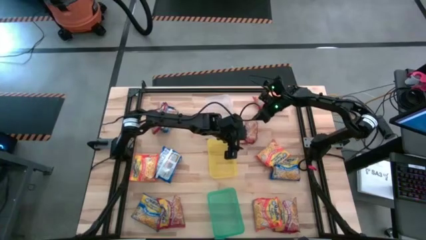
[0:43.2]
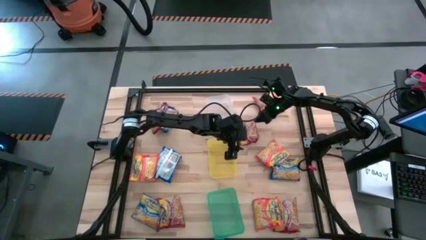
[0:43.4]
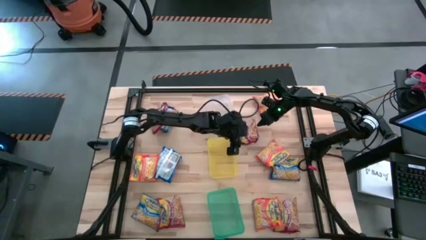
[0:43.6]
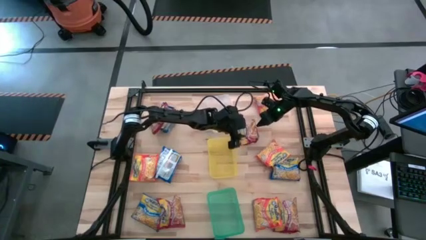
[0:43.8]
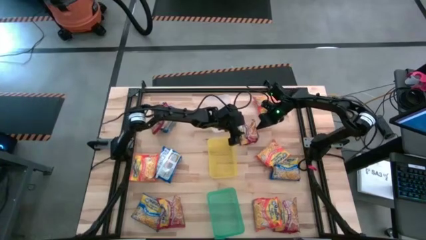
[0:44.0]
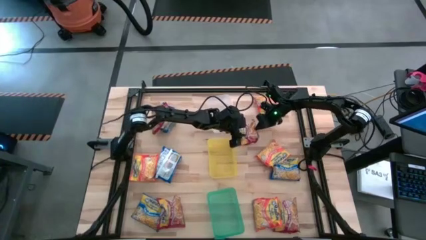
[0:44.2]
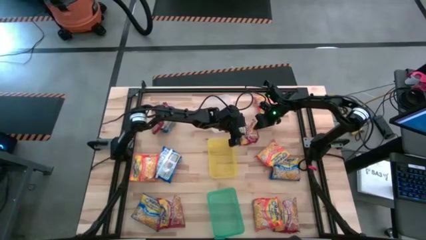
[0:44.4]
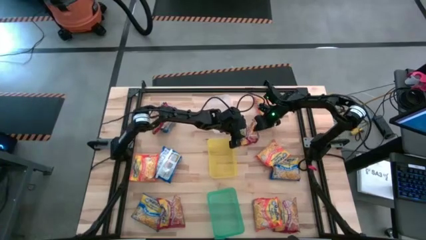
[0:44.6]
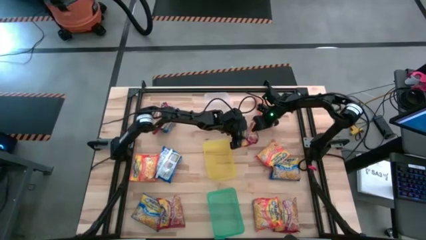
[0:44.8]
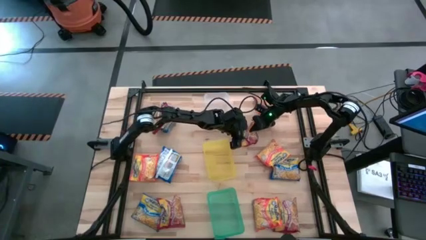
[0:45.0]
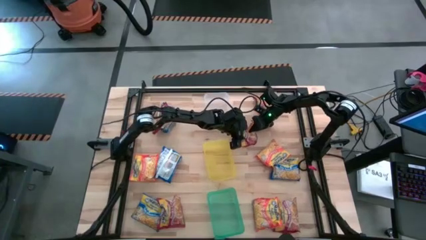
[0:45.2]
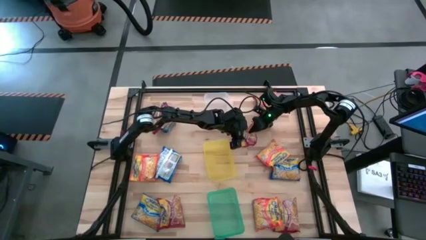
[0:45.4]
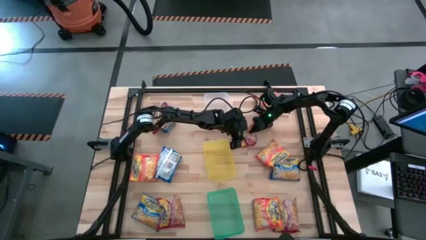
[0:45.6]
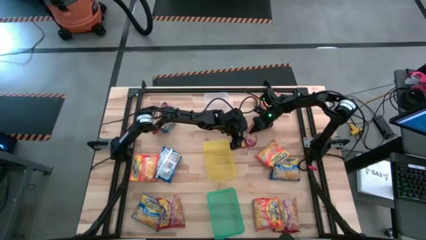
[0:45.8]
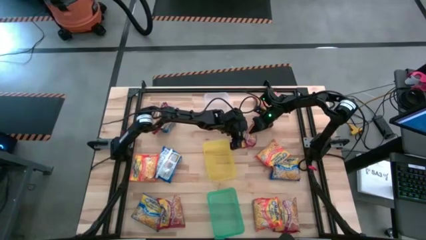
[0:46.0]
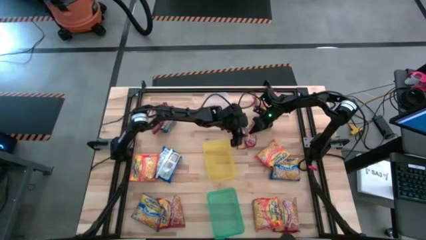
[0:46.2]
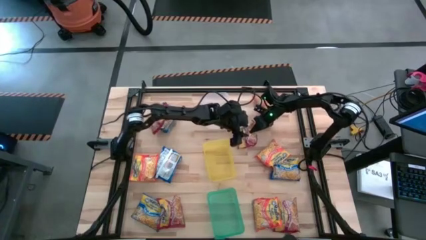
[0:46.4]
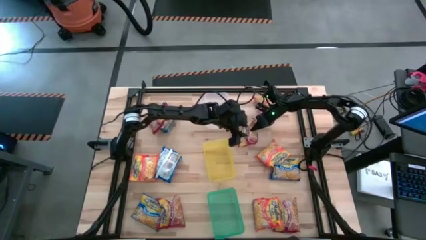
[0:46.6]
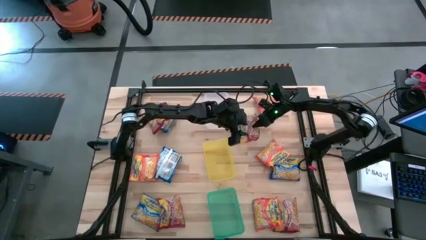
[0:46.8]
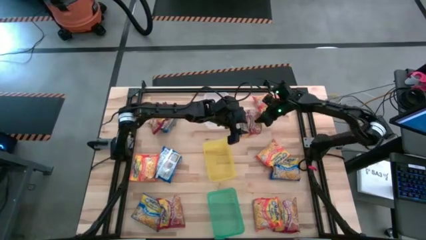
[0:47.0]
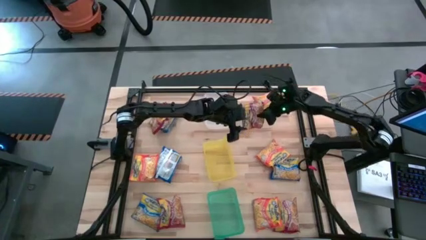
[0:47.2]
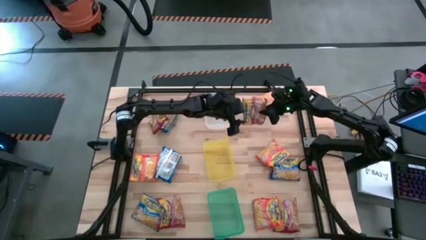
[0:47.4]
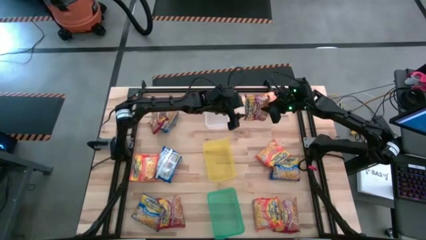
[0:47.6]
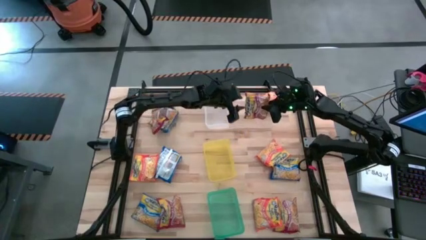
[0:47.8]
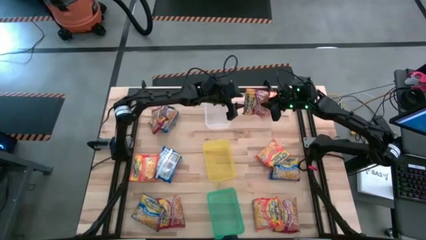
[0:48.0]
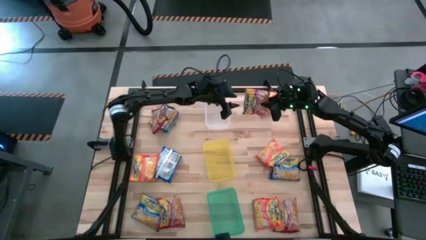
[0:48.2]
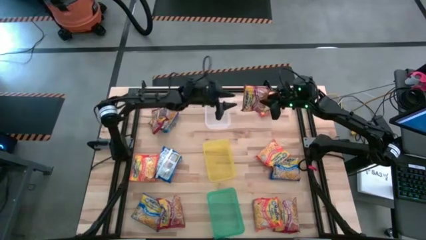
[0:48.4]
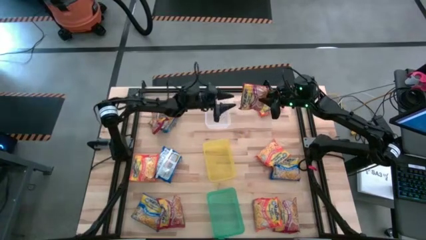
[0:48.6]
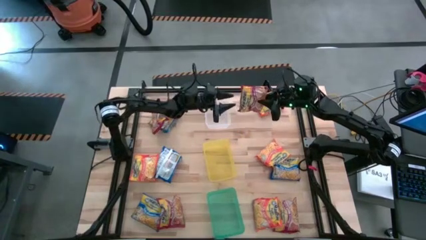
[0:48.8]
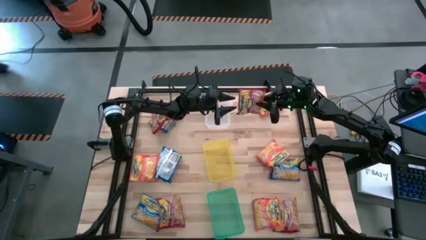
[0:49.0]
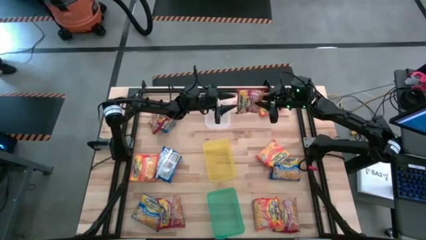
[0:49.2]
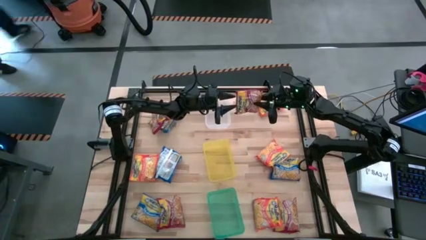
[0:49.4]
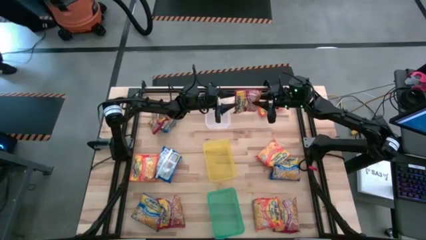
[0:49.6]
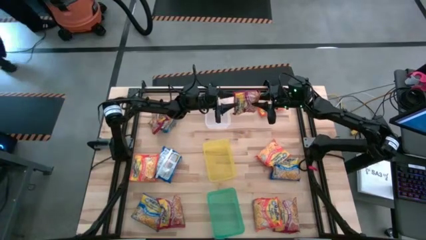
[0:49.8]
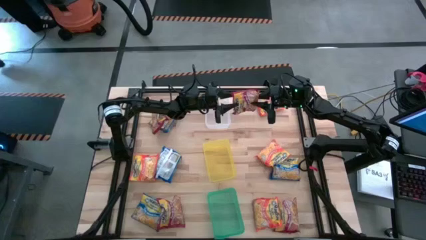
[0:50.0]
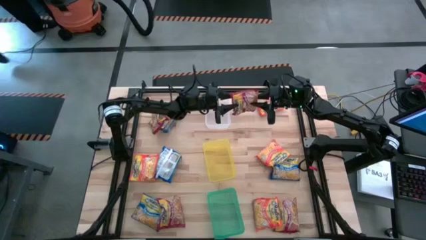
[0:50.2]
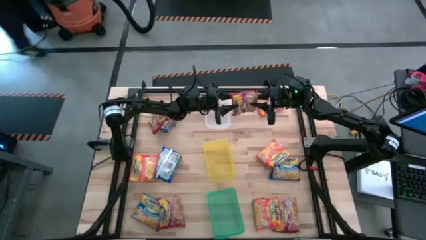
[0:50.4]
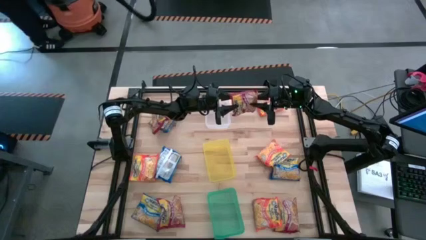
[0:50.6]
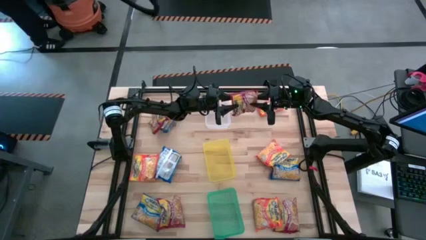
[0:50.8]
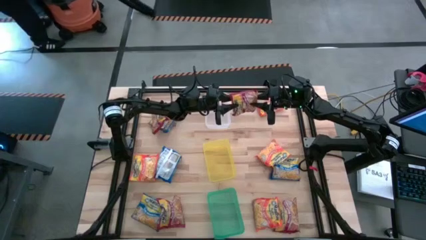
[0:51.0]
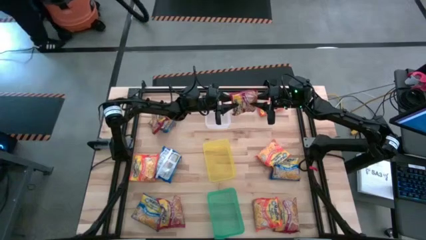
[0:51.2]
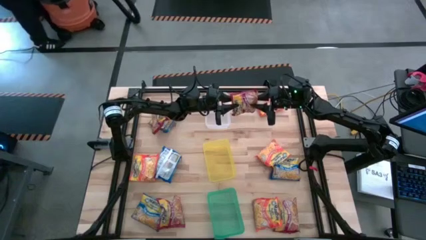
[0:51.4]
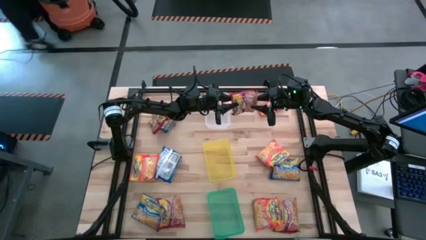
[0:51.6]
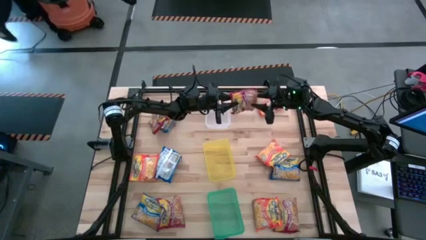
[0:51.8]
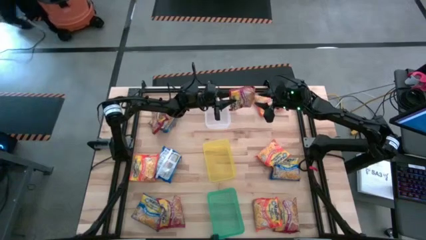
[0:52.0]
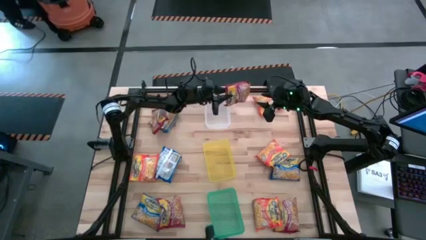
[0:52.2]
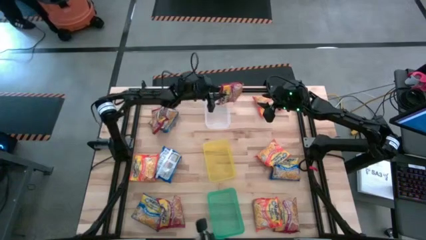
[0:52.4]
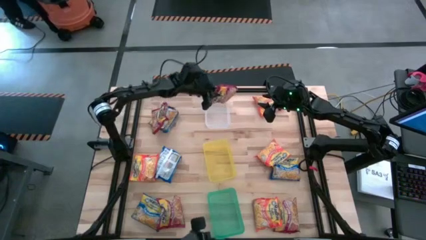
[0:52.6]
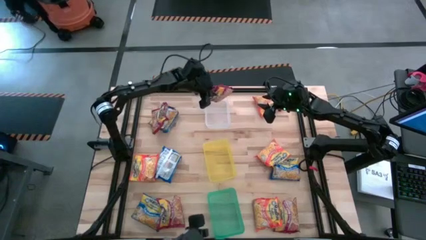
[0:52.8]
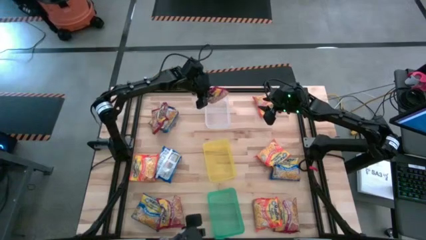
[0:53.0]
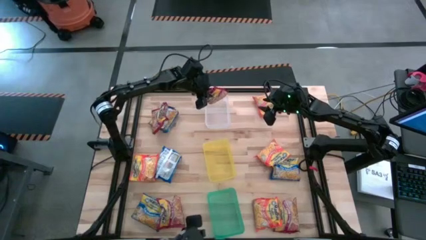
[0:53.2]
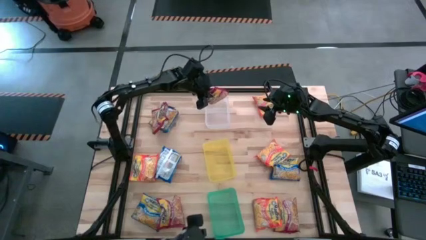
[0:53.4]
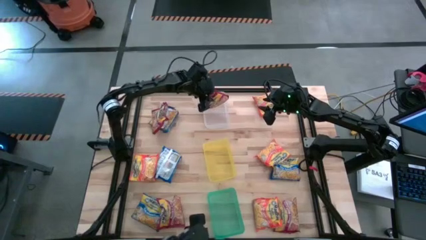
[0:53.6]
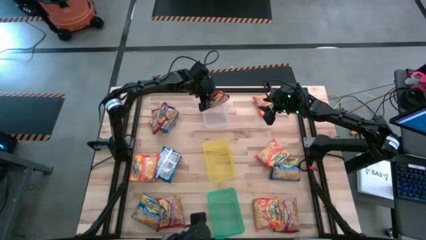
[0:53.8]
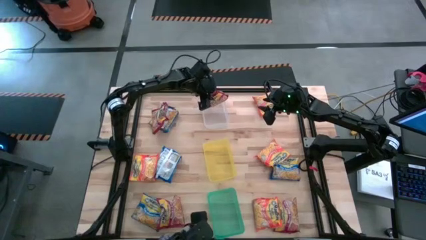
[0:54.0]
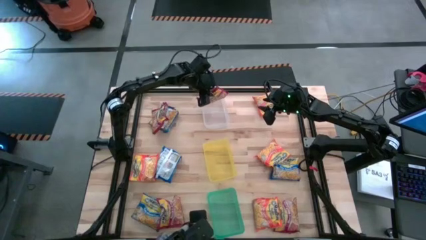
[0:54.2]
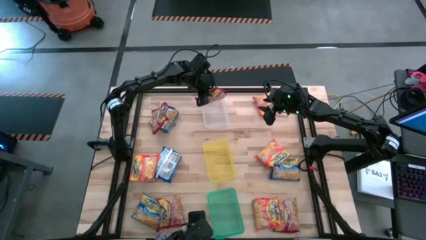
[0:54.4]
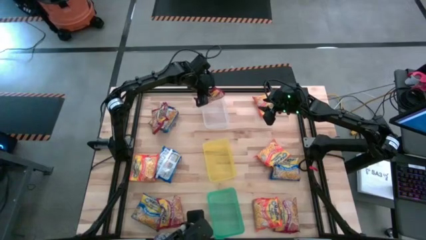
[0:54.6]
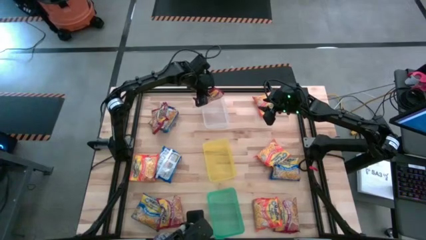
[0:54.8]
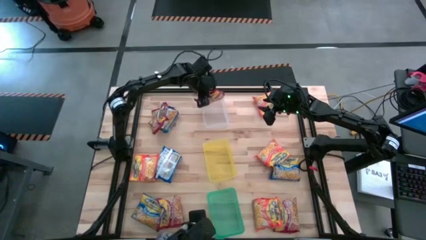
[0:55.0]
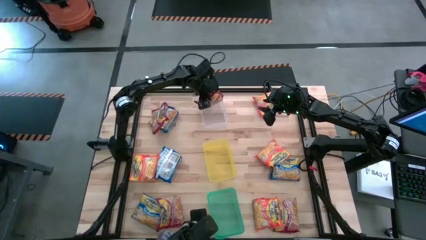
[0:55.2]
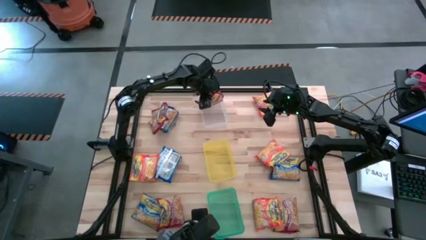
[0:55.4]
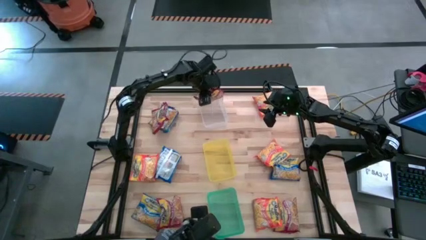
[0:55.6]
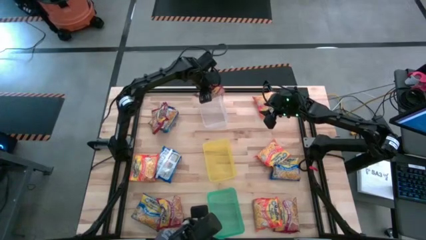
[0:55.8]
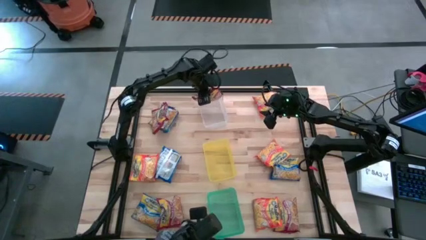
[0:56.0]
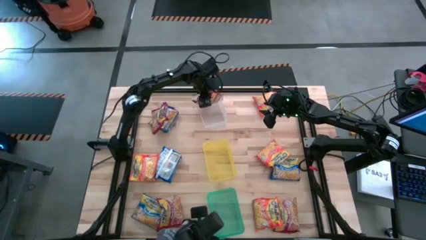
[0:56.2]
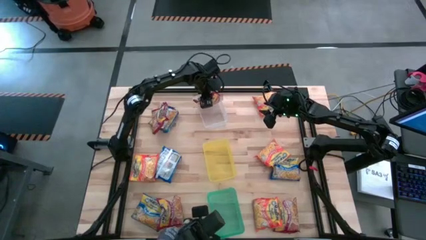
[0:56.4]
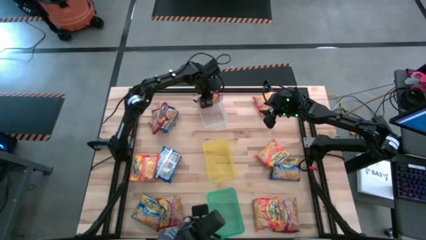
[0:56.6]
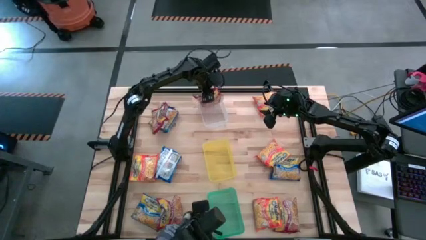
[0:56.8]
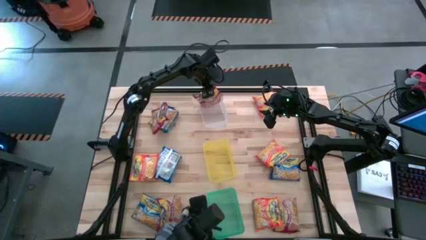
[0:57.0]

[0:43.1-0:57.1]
Task: Sort Maruchan noodles
Put the red noodle pack into the transparent bin

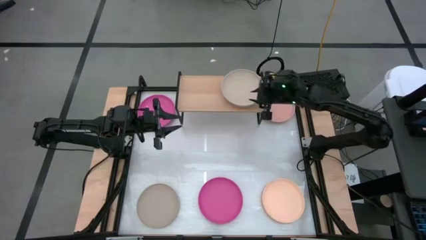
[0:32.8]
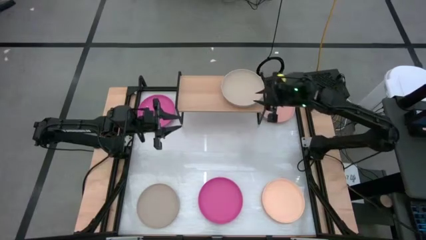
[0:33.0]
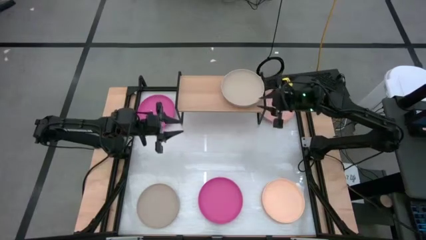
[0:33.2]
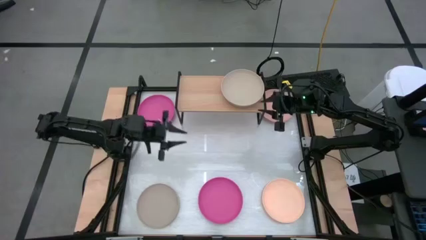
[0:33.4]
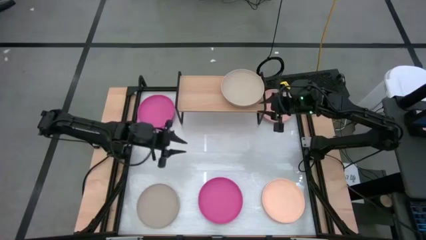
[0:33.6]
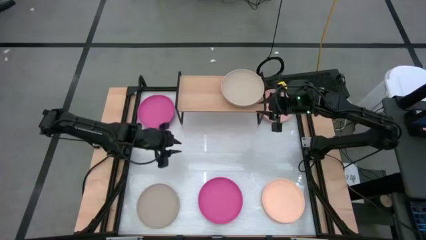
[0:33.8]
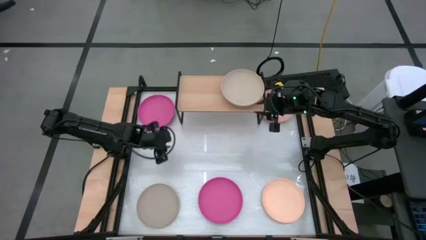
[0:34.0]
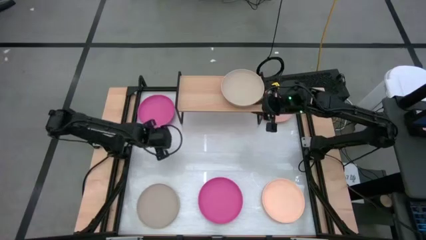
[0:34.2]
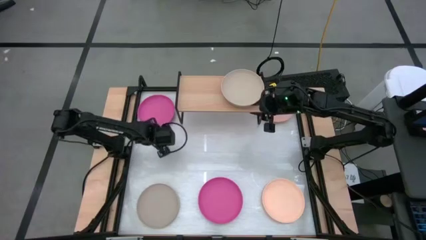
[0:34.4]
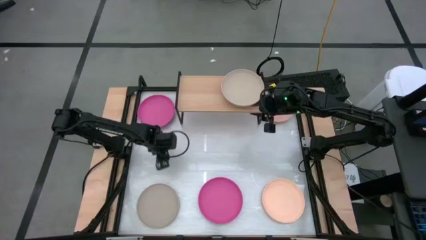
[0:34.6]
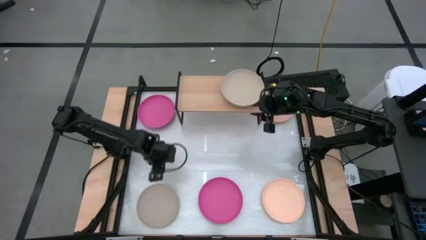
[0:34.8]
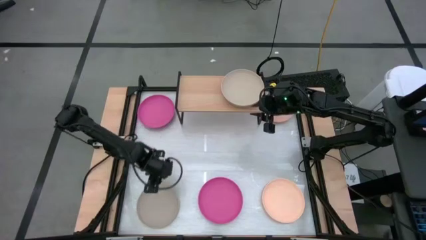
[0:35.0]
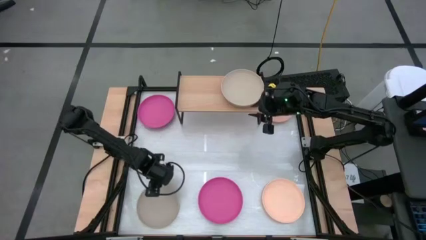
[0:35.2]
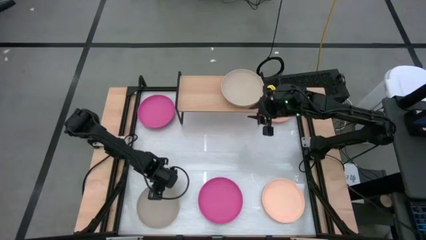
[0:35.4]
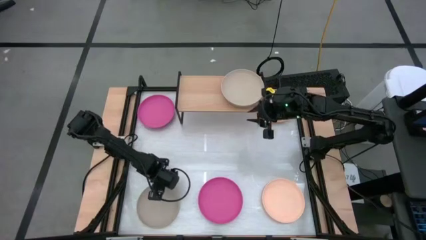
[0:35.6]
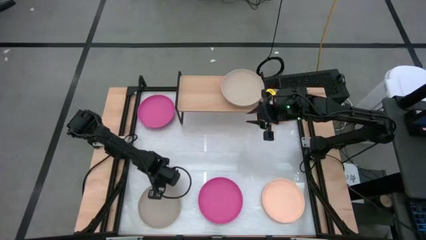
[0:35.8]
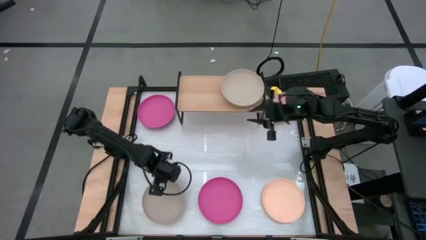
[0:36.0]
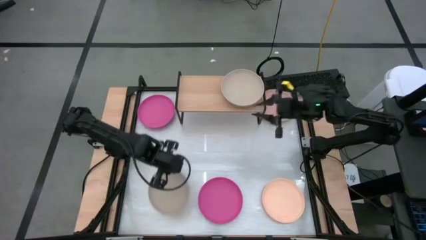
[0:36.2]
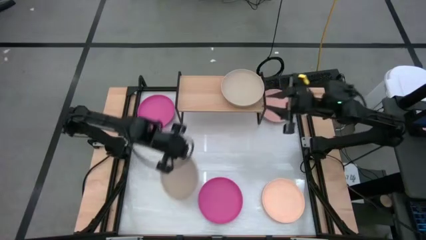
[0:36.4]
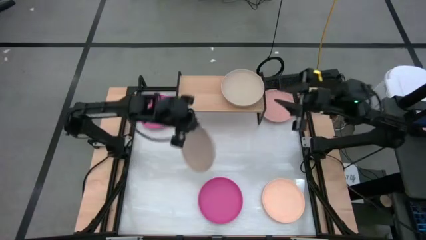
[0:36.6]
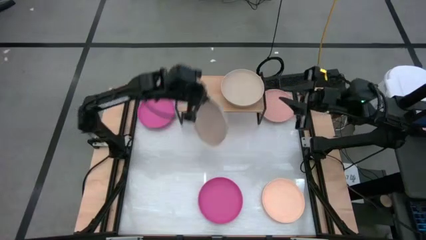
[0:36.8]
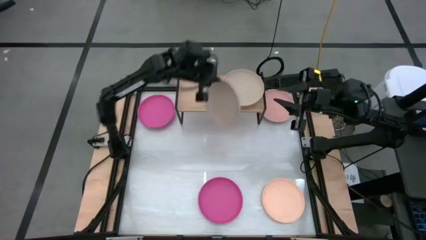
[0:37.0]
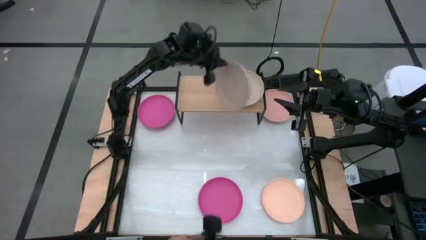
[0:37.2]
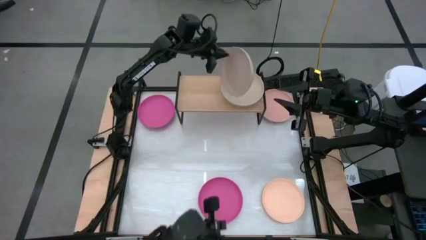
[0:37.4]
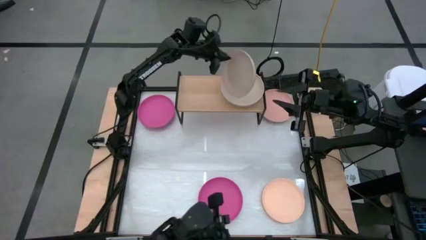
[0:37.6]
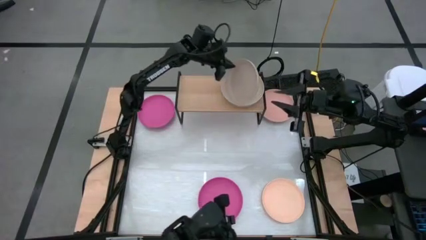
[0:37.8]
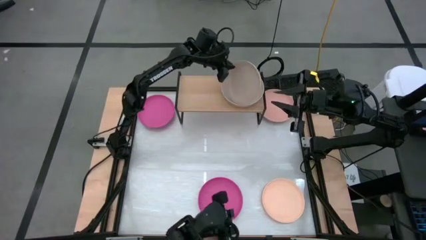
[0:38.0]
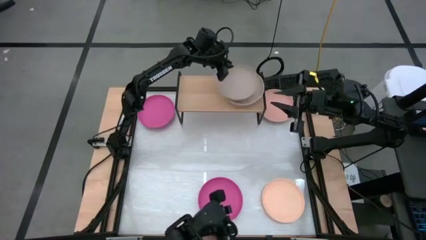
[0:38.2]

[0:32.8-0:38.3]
Task: Place and stack plates onto a shelf
Stack the light brown plate on top of the light brown plate on the shelf
